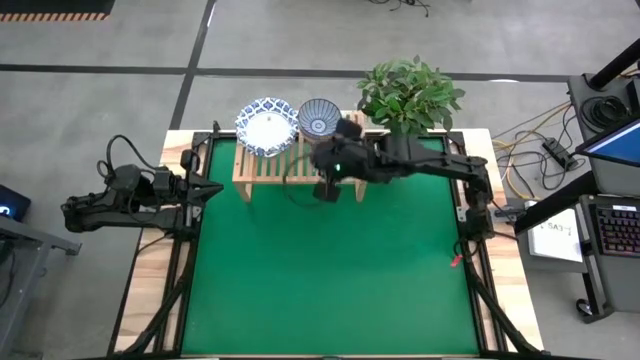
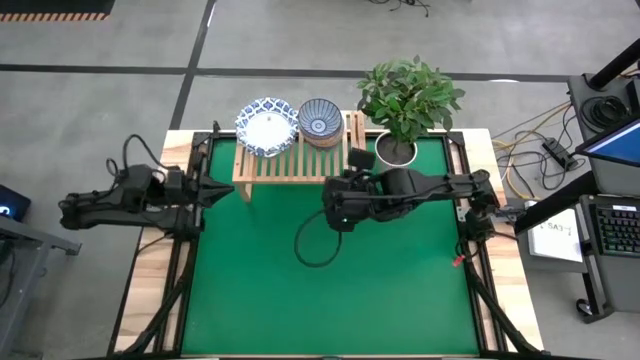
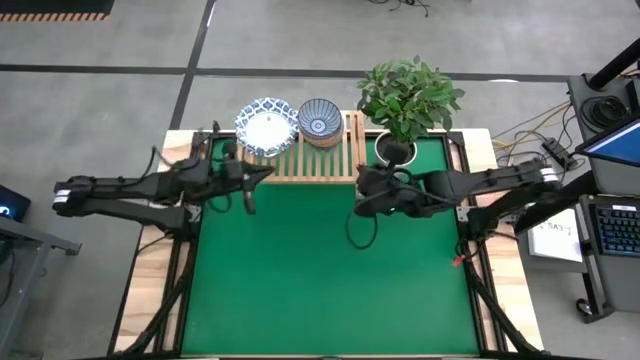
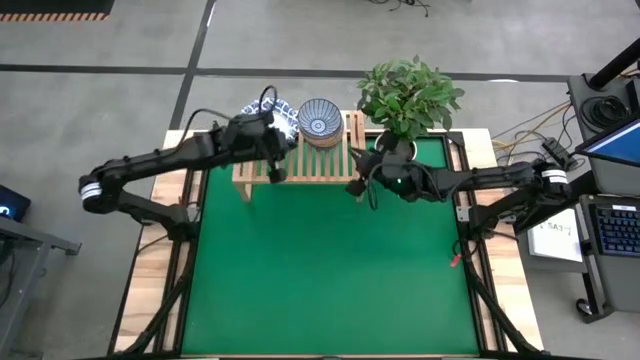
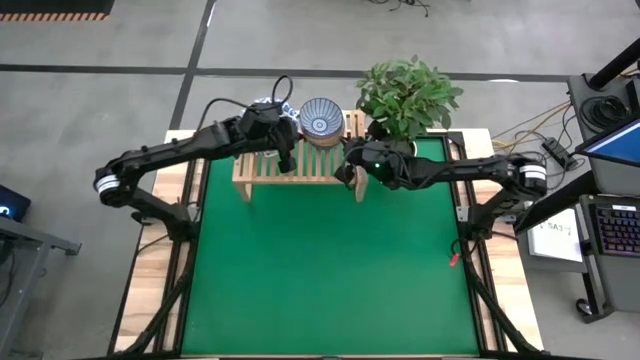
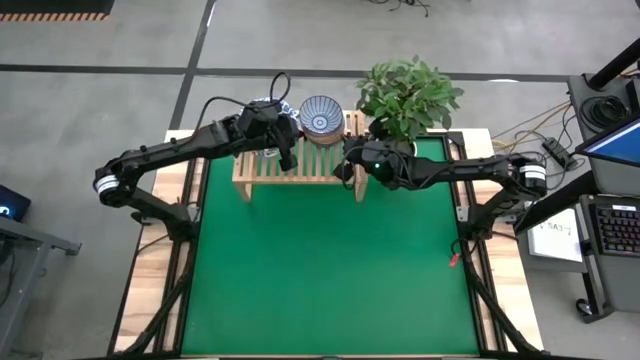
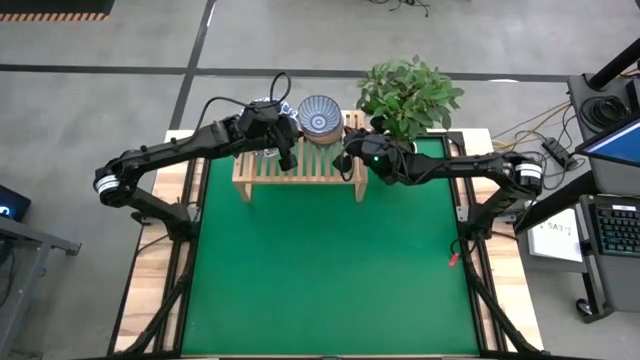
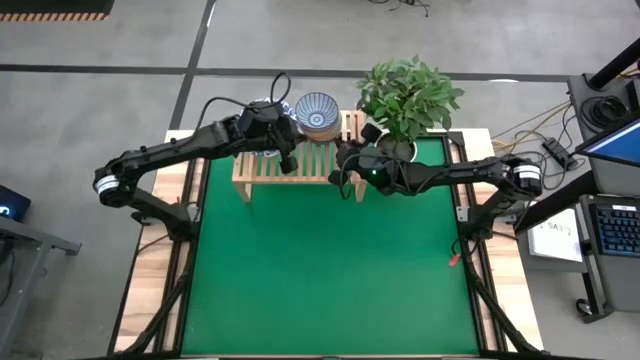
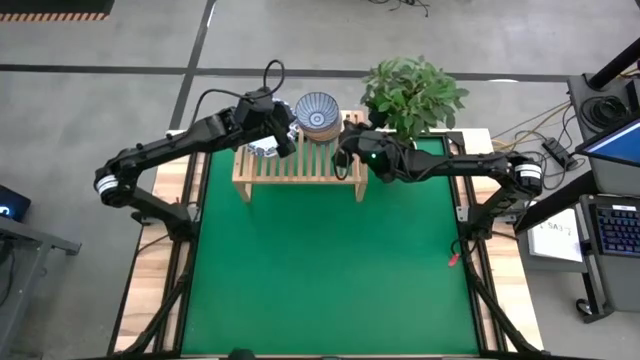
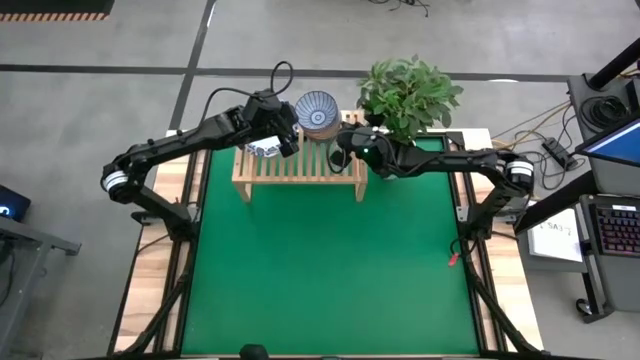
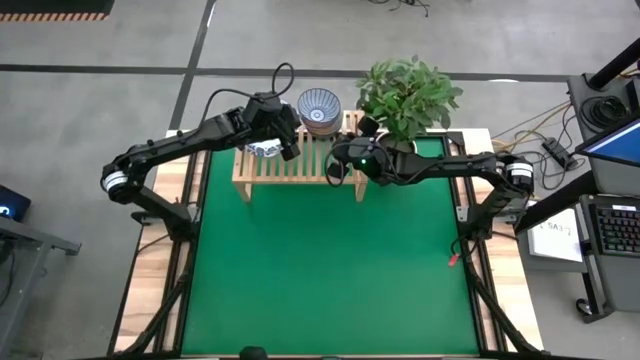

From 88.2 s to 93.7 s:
Task: Place and stack bowls onto a shelf
Adjust the stacked bowls on the shelf

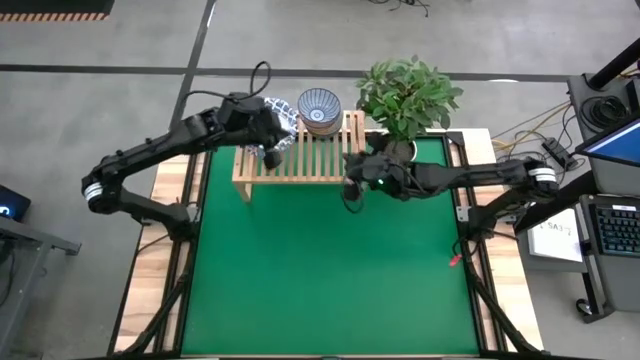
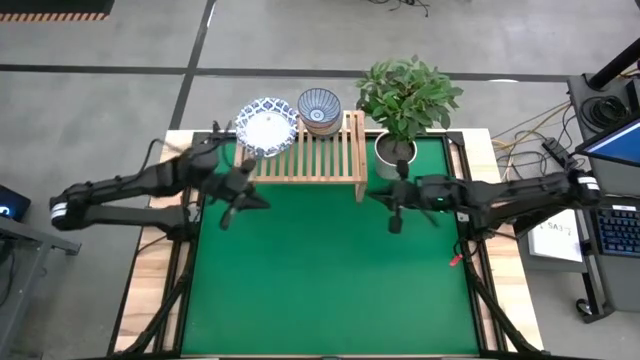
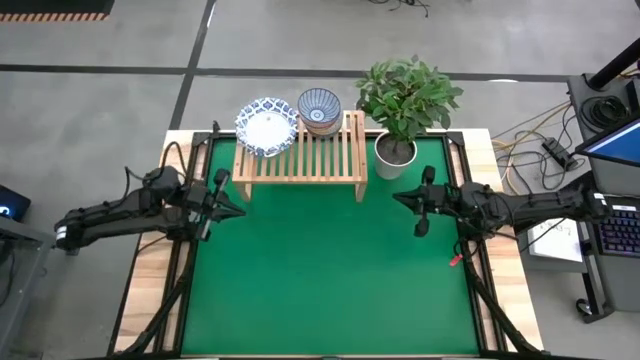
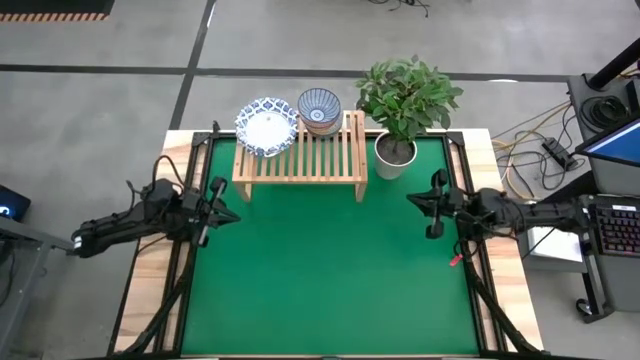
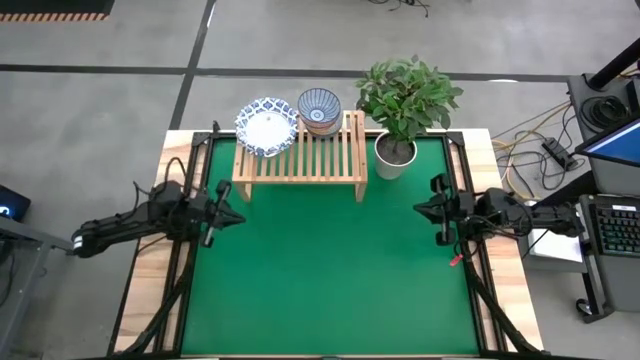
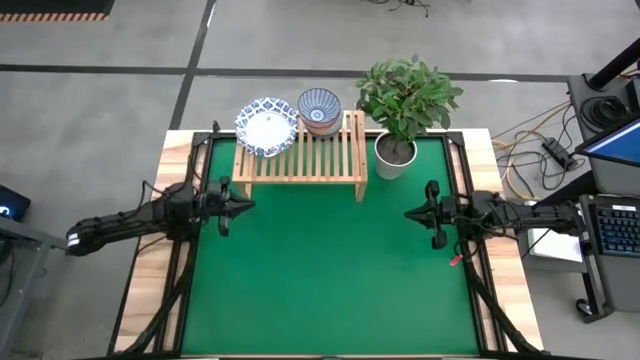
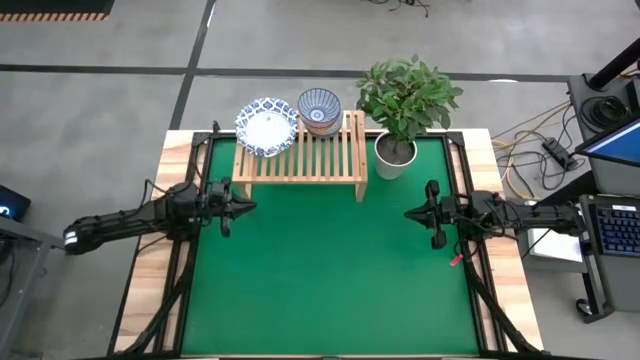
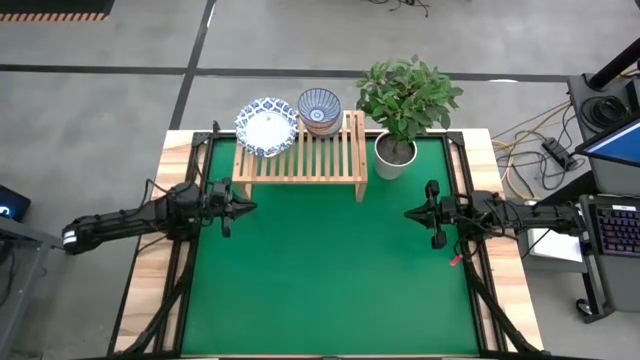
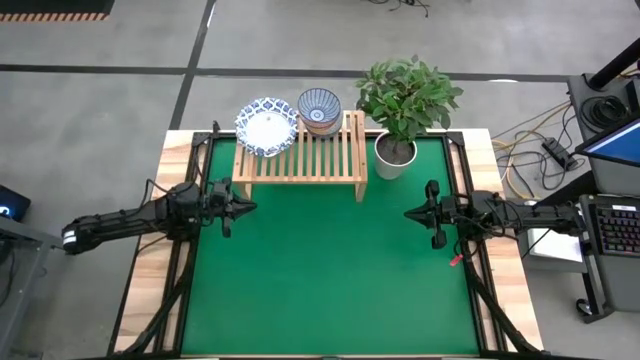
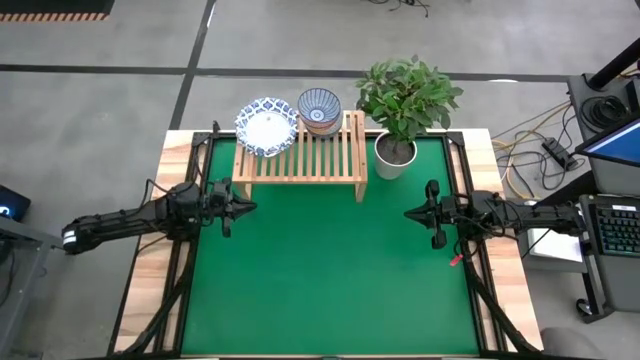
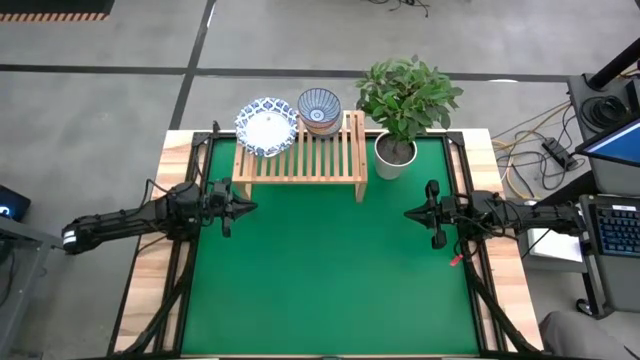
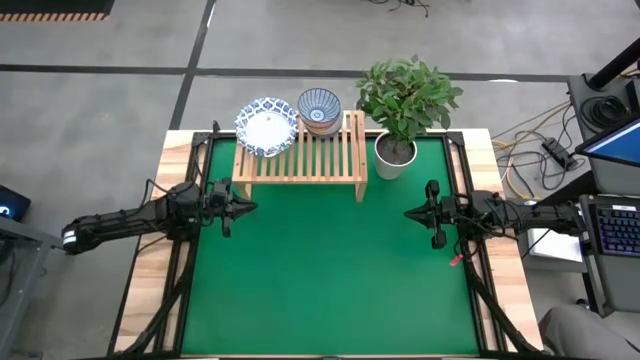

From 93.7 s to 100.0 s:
Return to Home Position

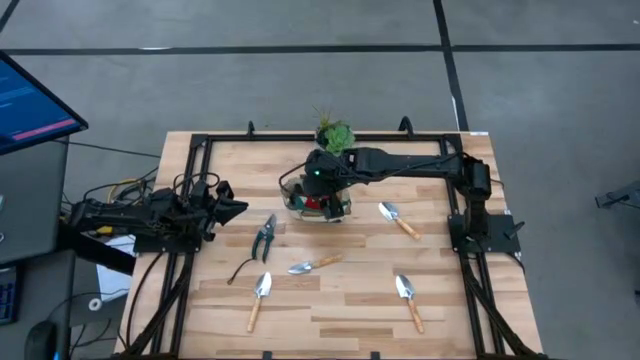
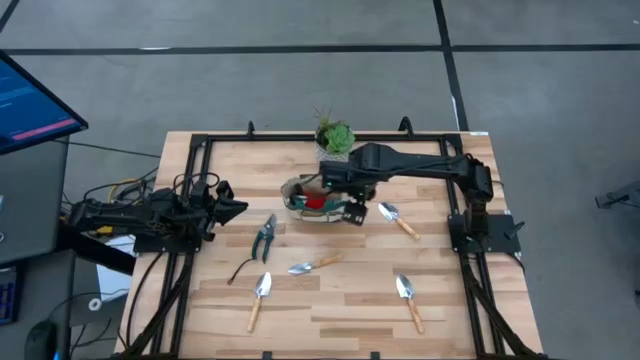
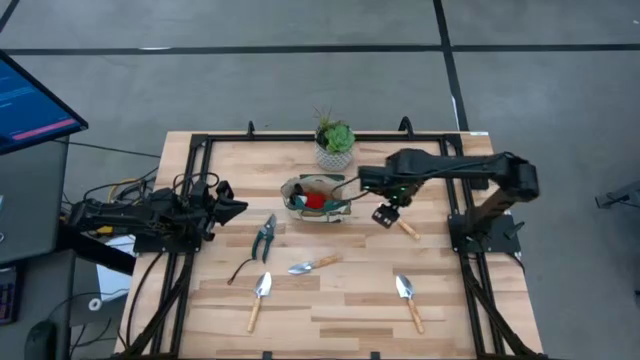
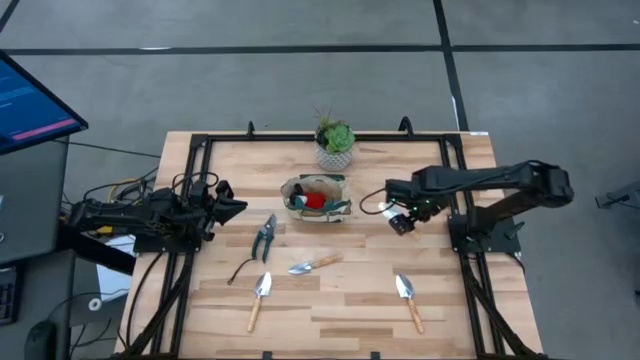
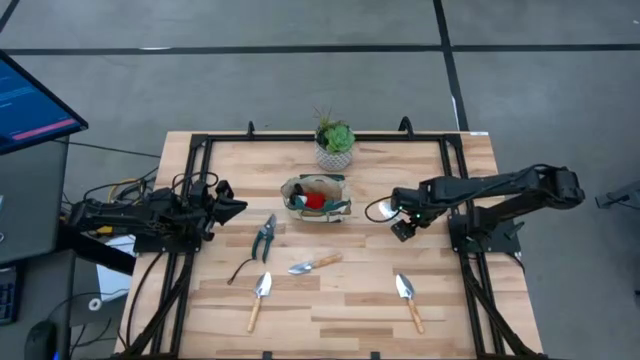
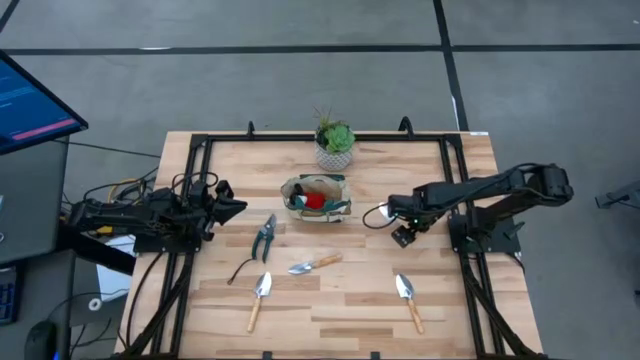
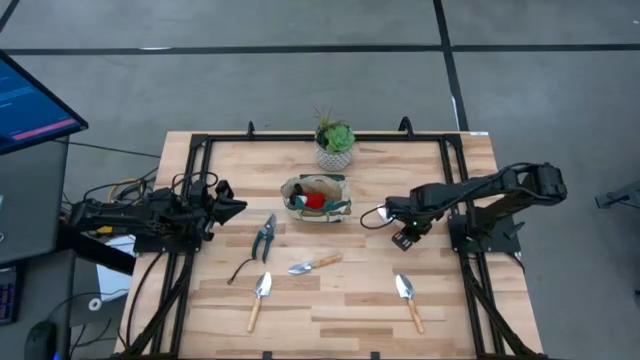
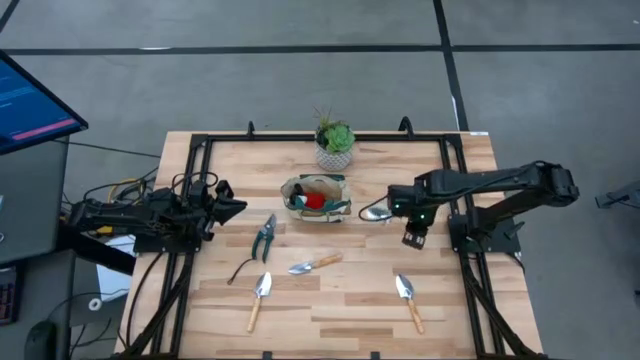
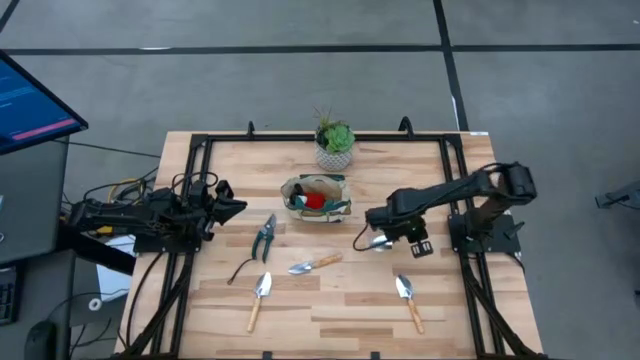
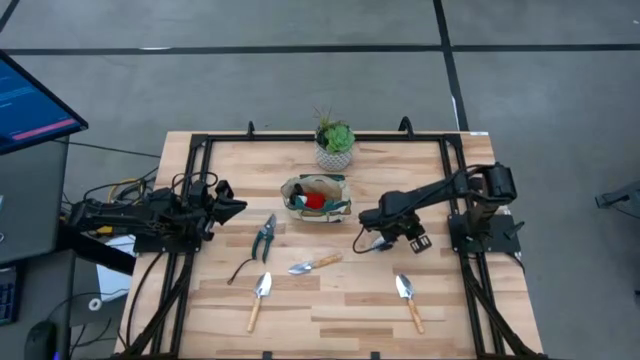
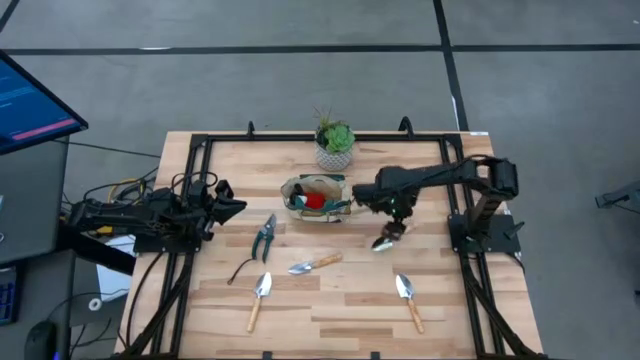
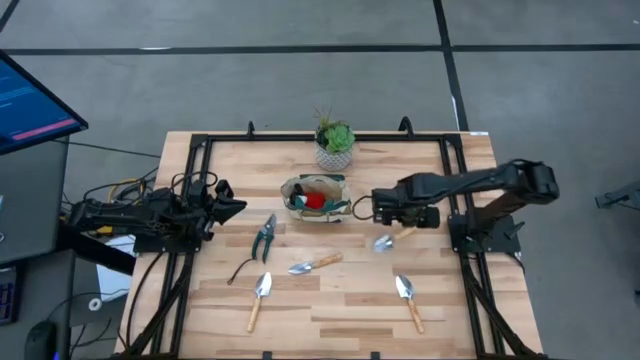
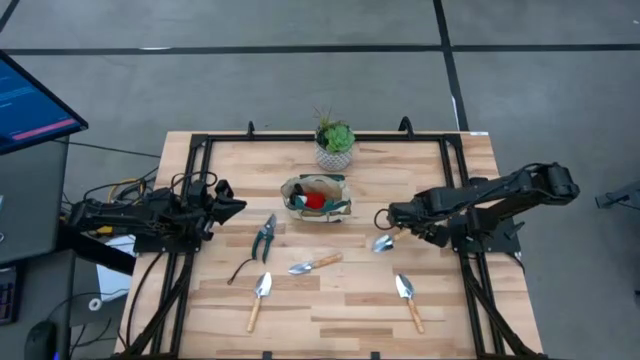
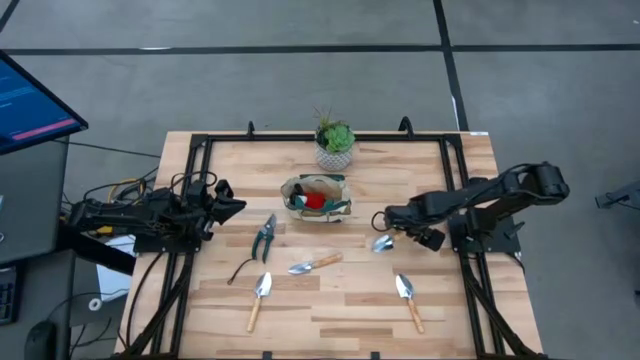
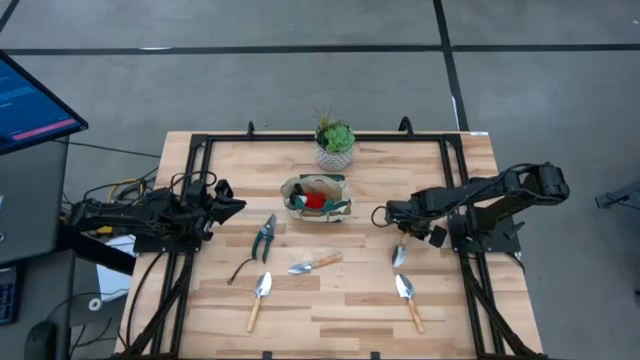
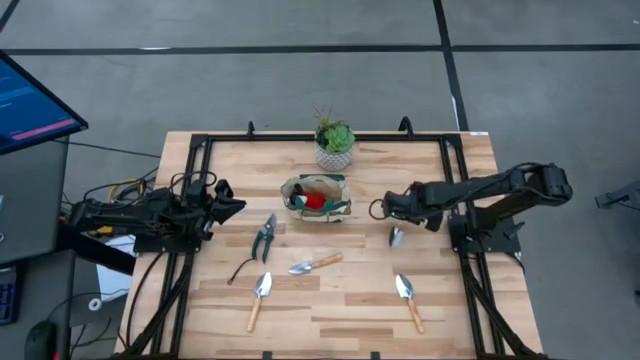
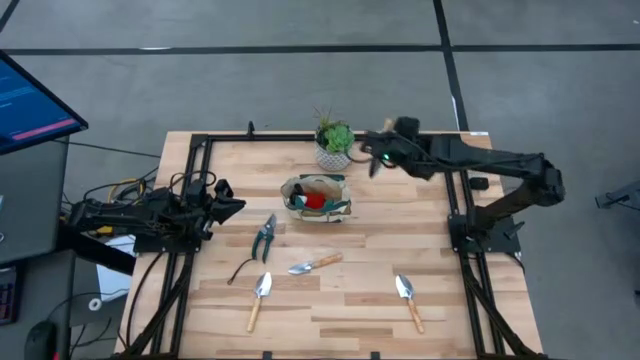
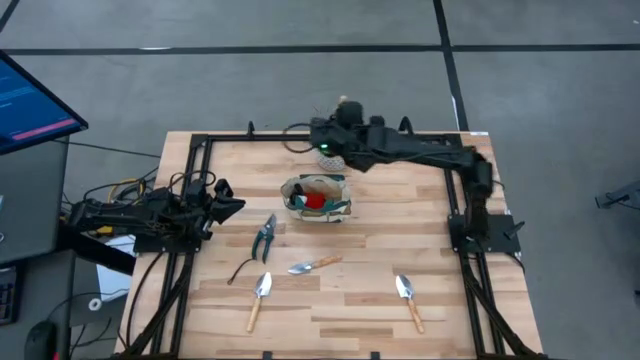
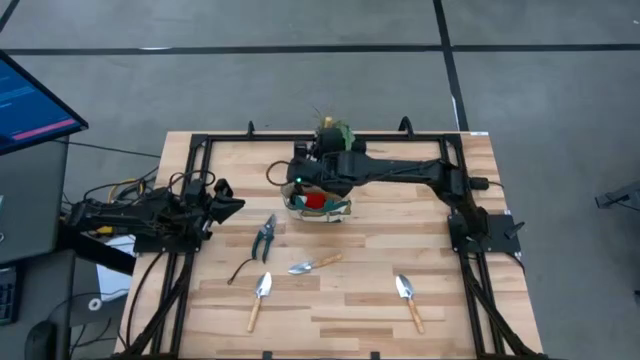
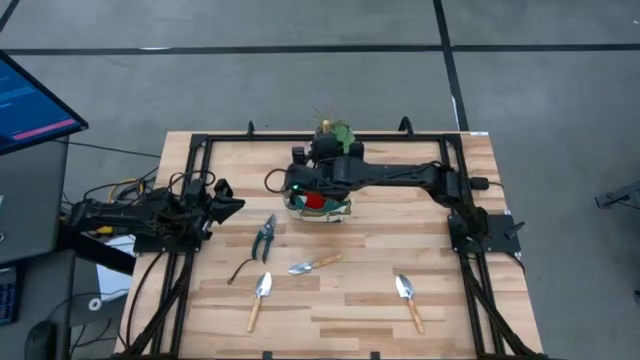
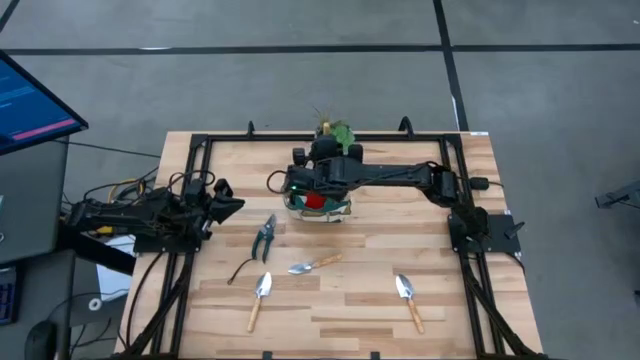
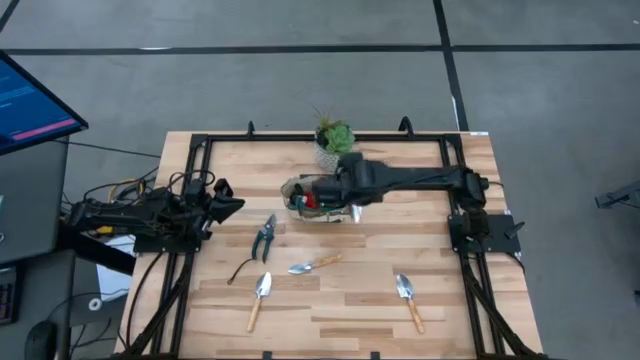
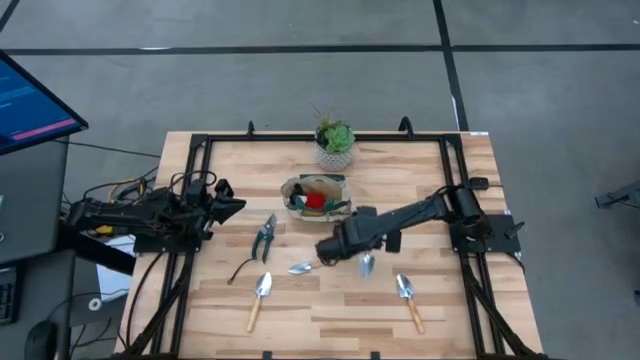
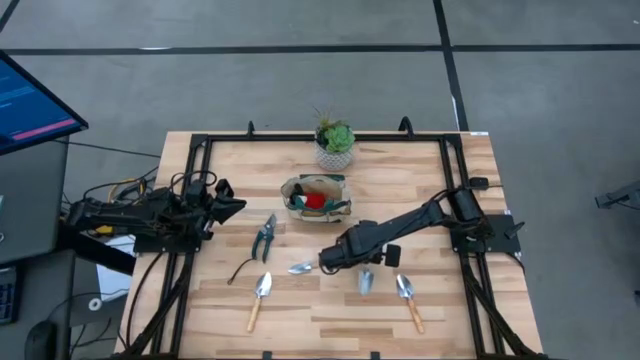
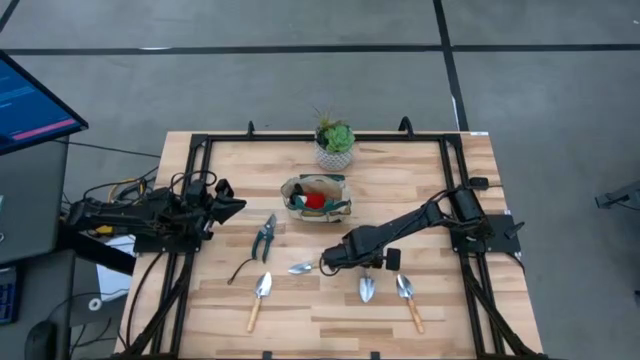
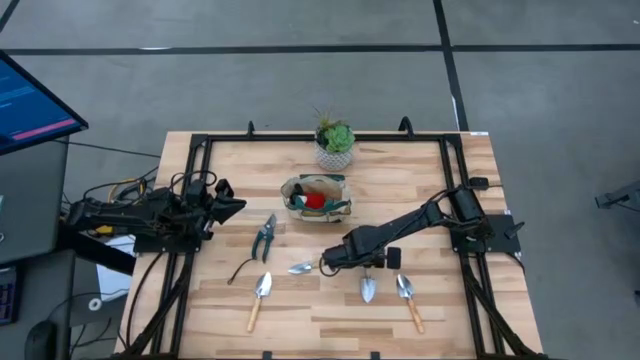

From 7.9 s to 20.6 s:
Task: Pick & Place Garden tools in Gardening bag
Put the top right trowel into the gardening bag
